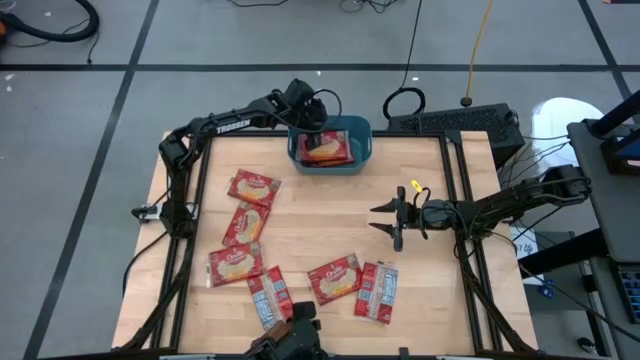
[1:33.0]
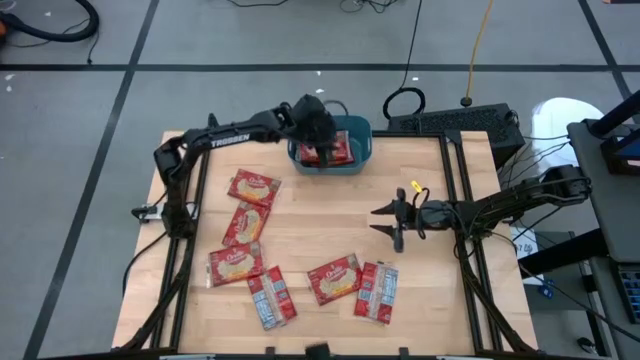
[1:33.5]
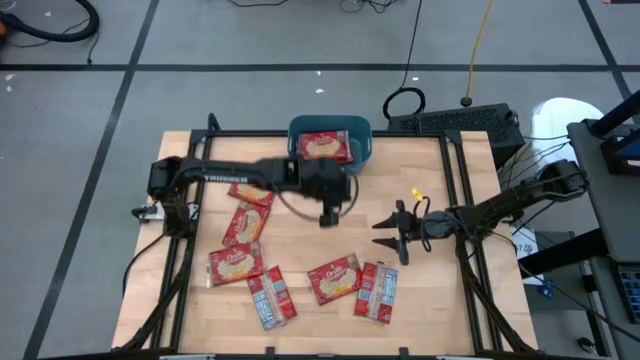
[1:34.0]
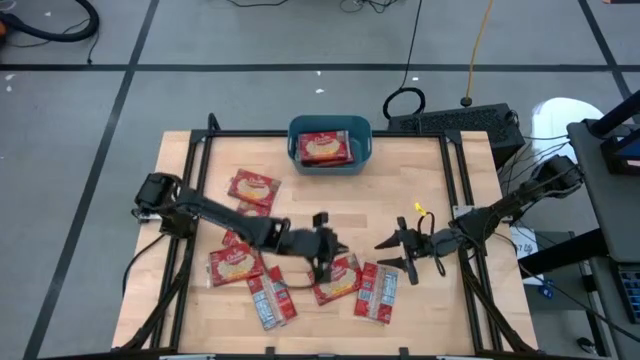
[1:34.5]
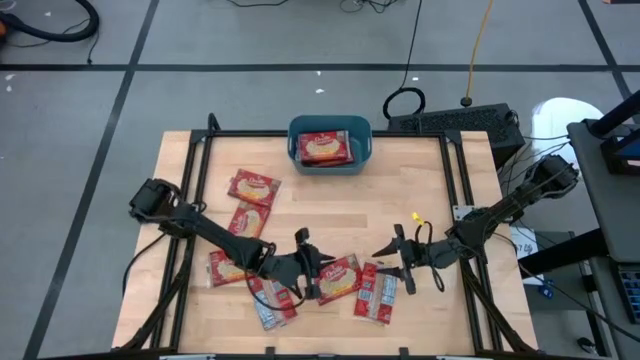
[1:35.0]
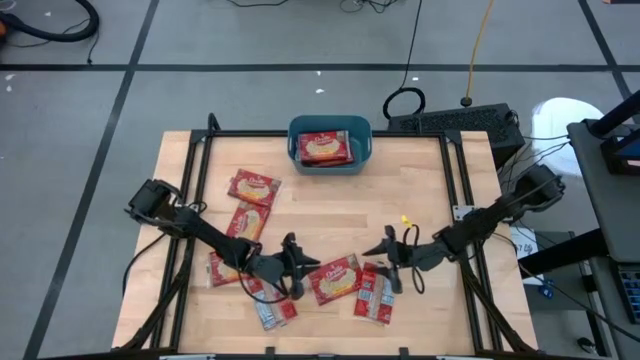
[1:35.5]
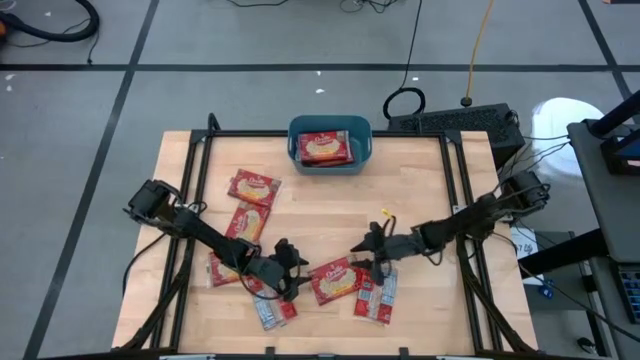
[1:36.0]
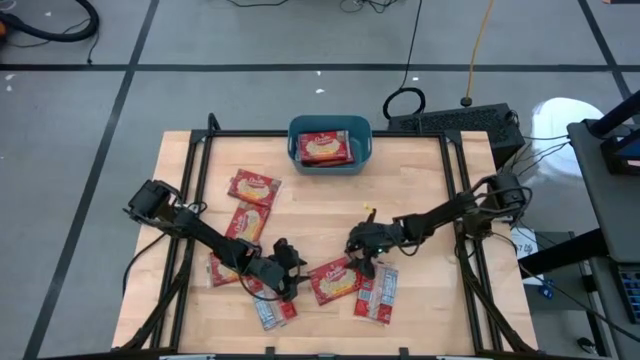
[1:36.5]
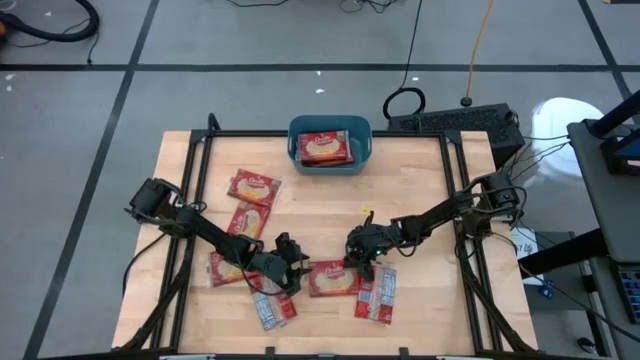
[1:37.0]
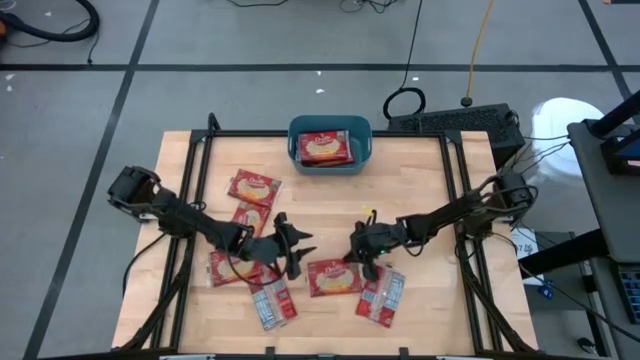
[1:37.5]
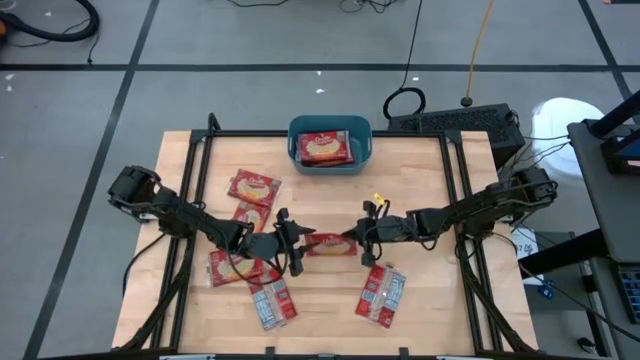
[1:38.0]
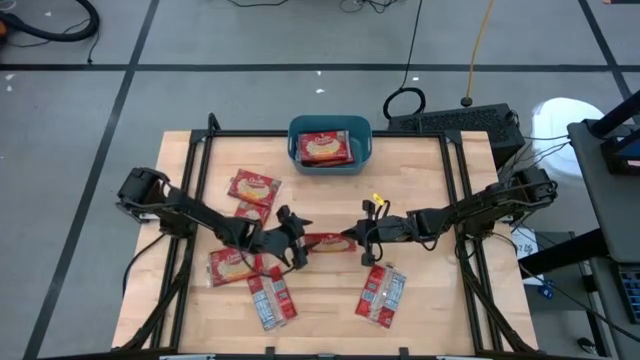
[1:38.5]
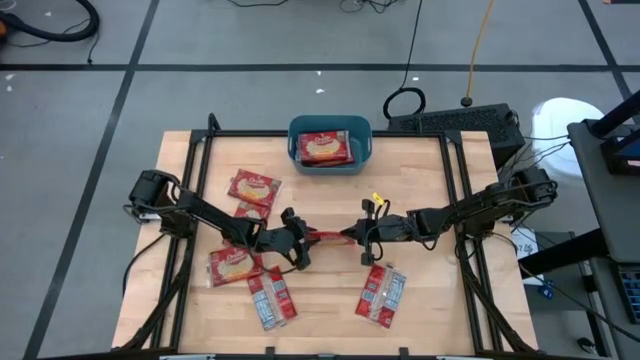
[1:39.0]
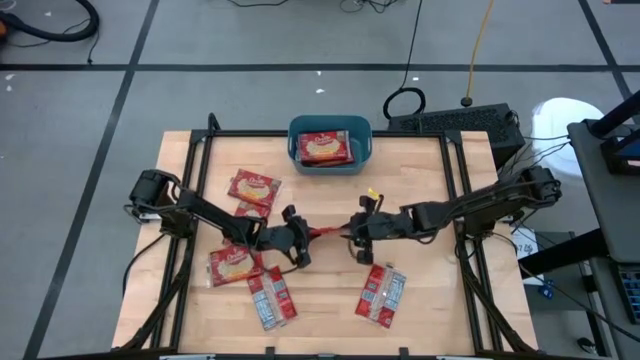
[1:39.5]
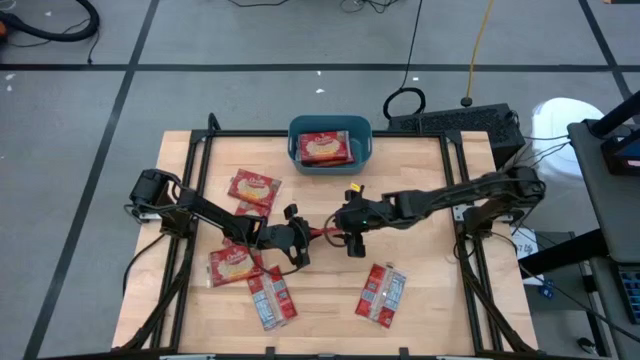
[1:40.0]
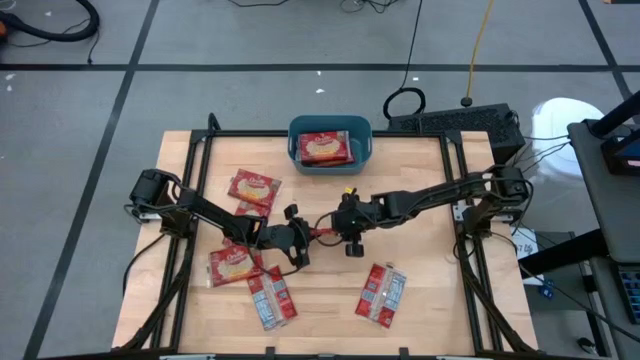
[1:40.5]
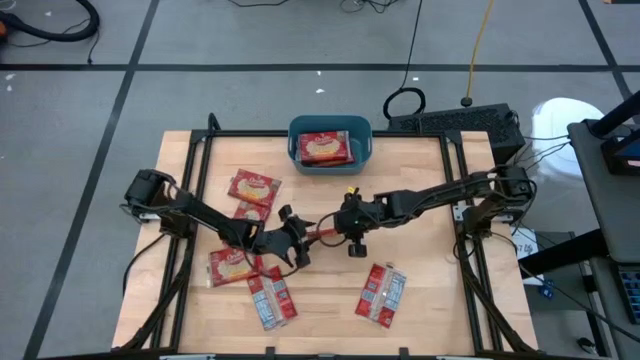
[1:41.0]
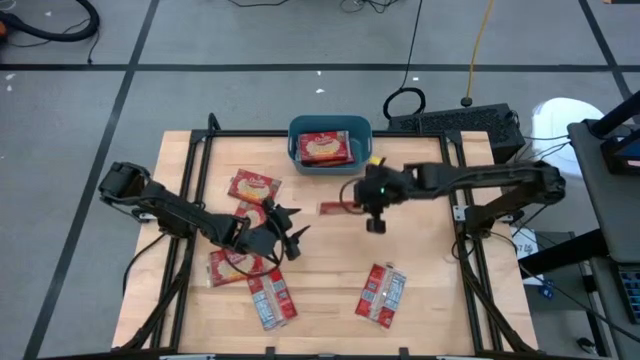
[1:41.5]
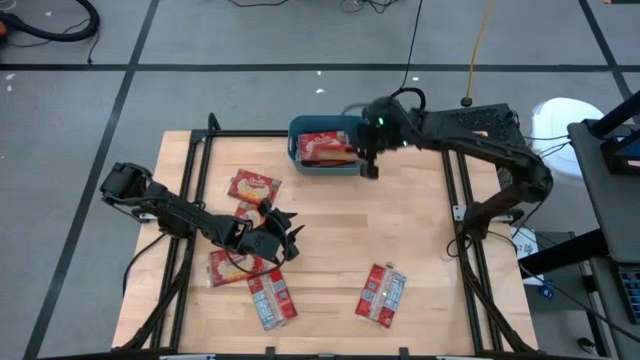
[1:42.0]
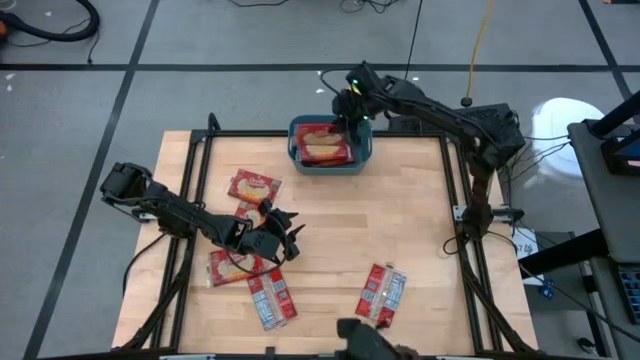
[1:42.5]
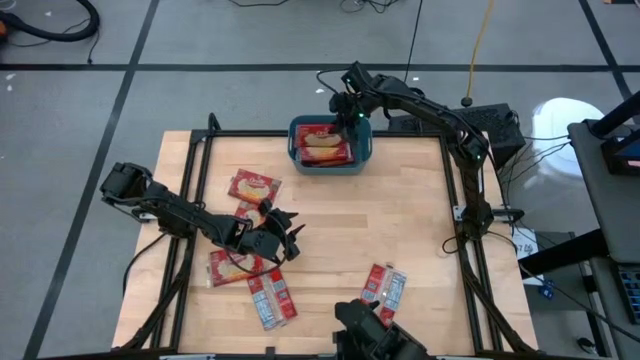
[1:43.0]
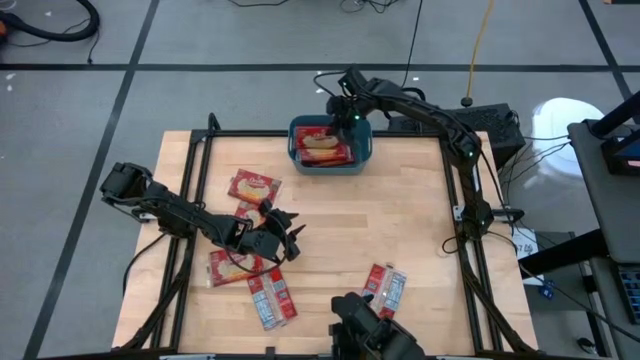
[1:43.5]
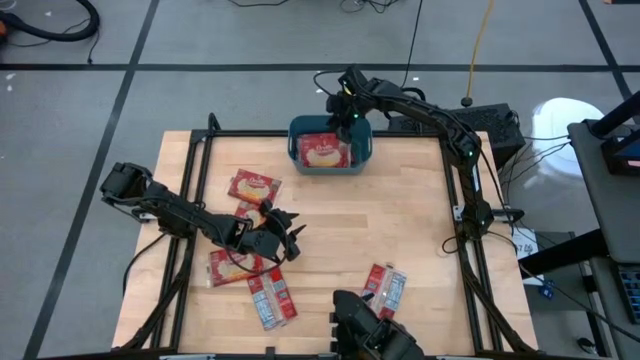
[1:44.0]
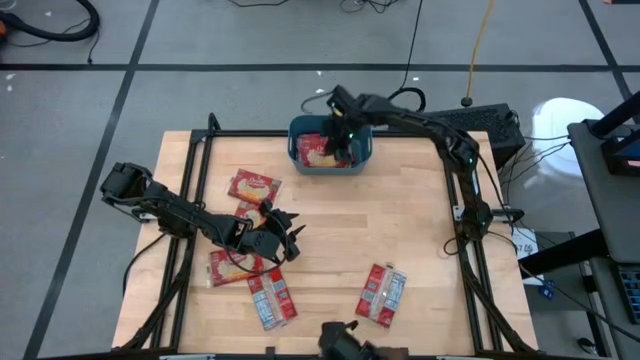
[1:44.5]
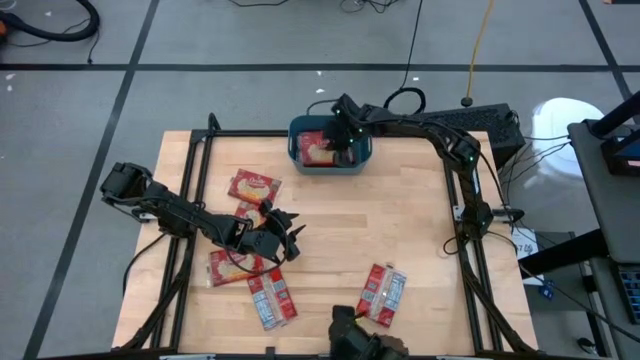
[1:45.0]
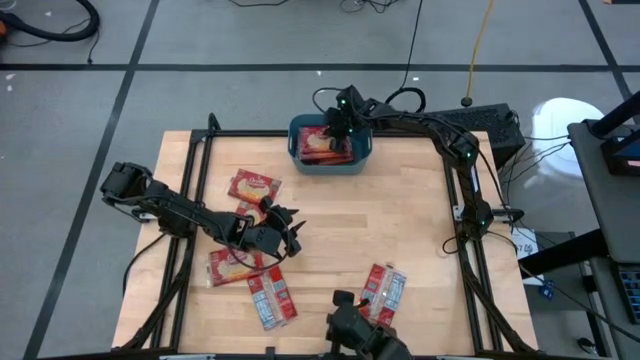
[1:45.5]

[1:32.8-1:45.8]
Task: Sort popcorn bags into baskets
Put the red popcorn bag into the blue bin

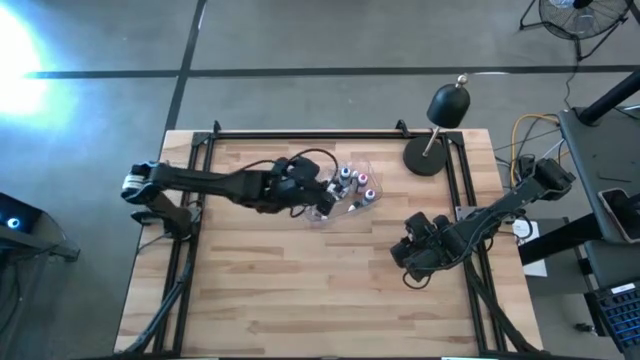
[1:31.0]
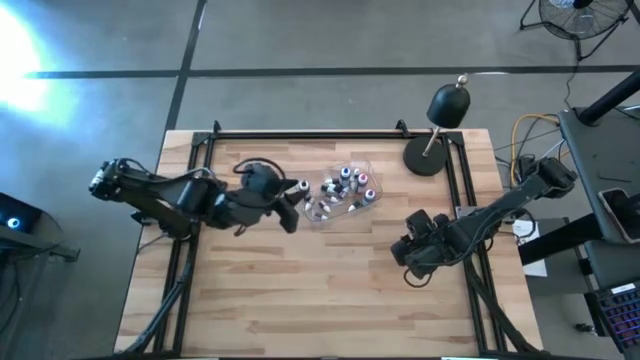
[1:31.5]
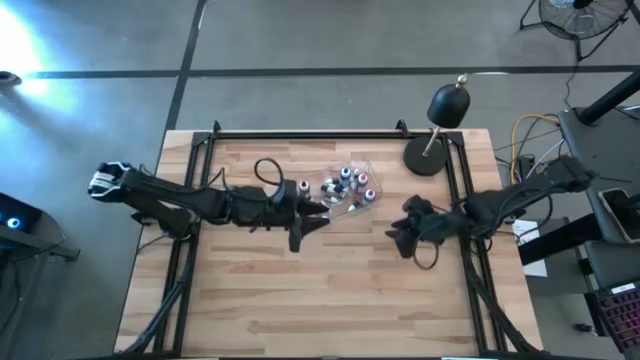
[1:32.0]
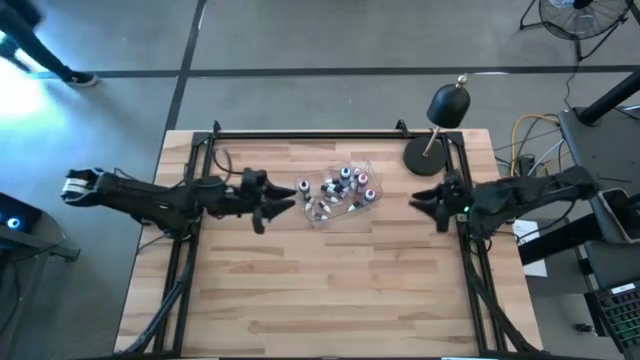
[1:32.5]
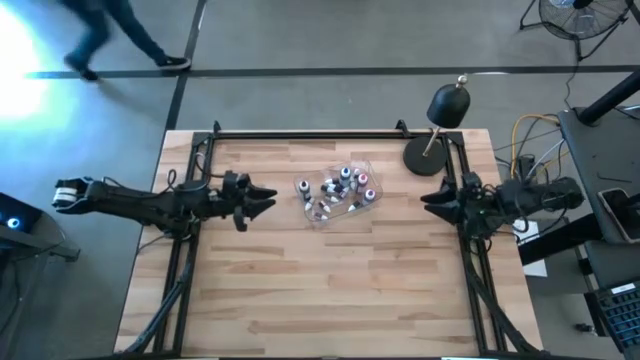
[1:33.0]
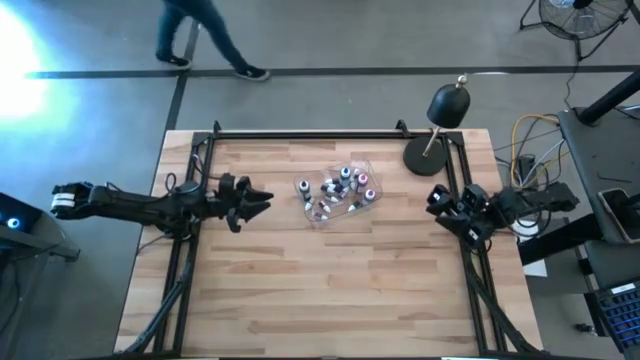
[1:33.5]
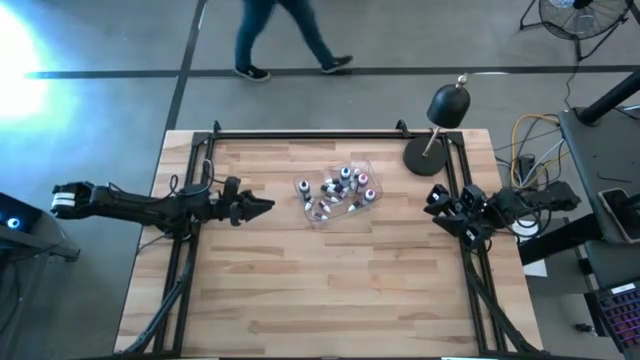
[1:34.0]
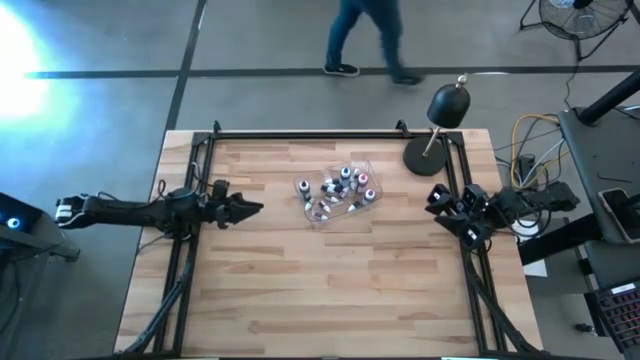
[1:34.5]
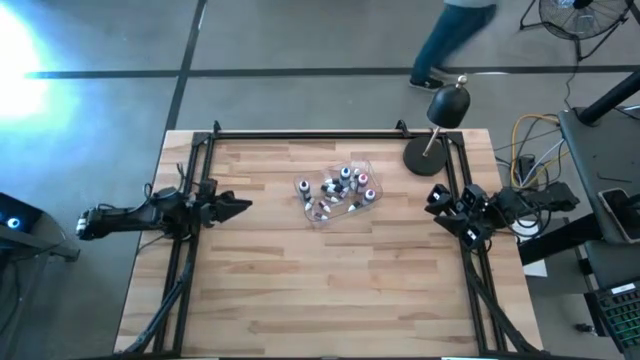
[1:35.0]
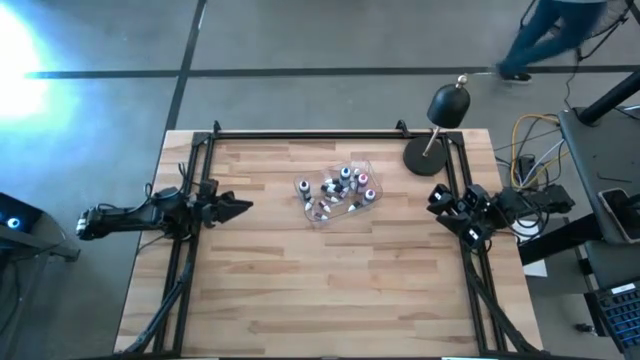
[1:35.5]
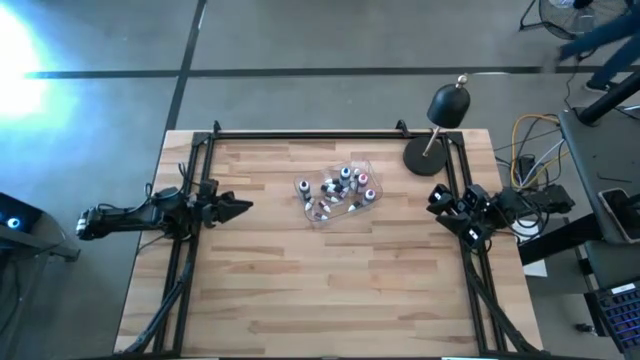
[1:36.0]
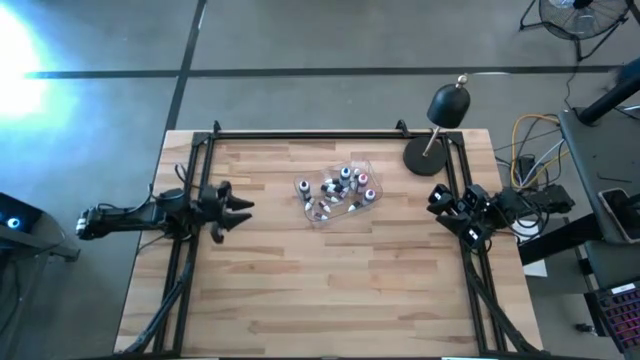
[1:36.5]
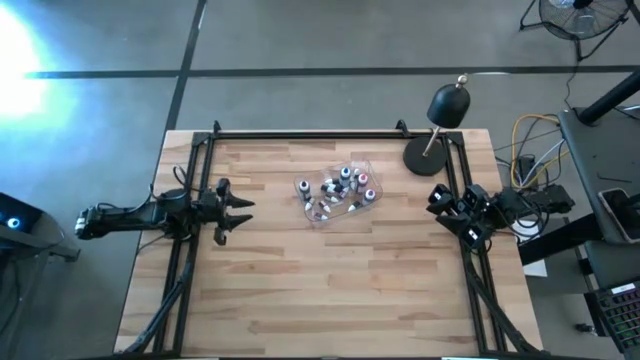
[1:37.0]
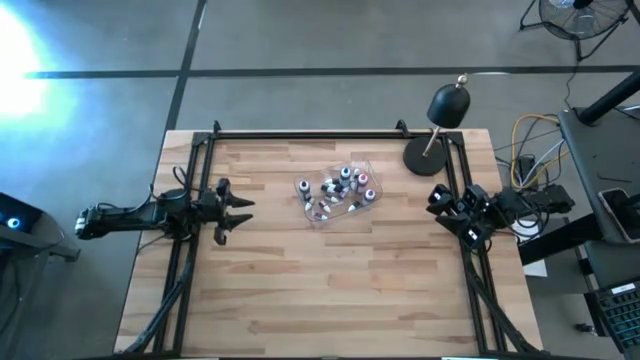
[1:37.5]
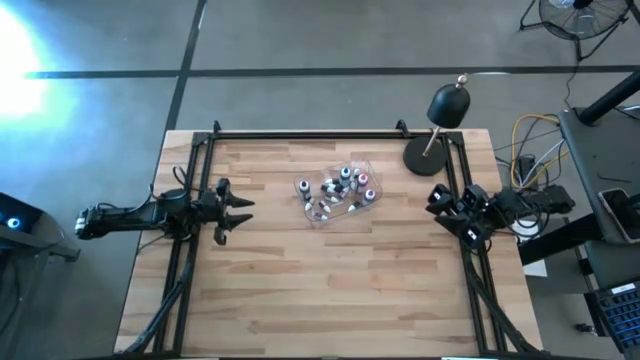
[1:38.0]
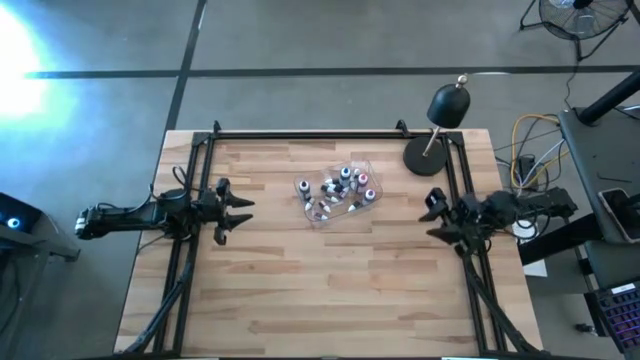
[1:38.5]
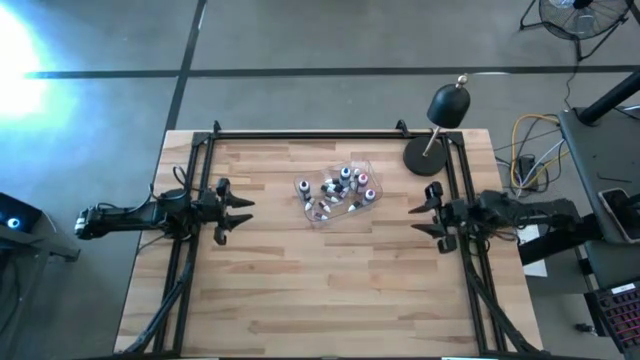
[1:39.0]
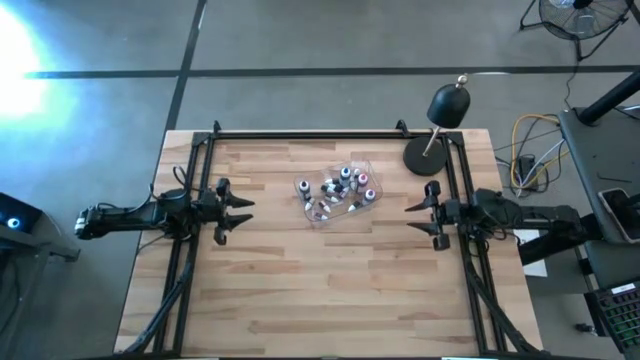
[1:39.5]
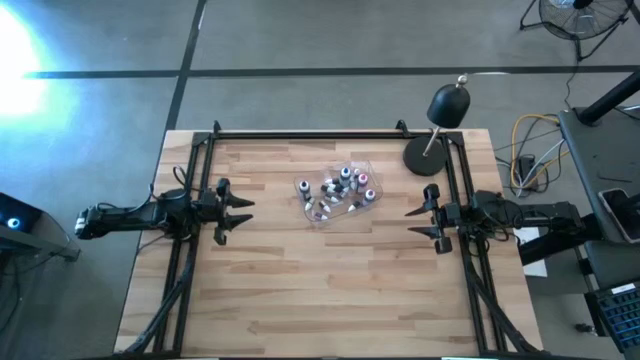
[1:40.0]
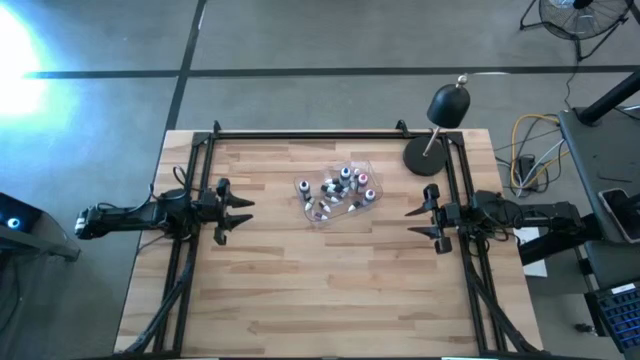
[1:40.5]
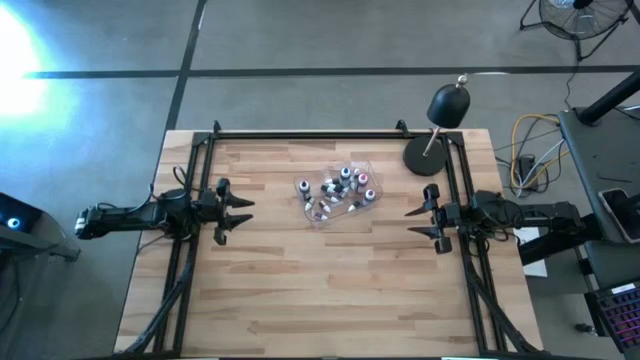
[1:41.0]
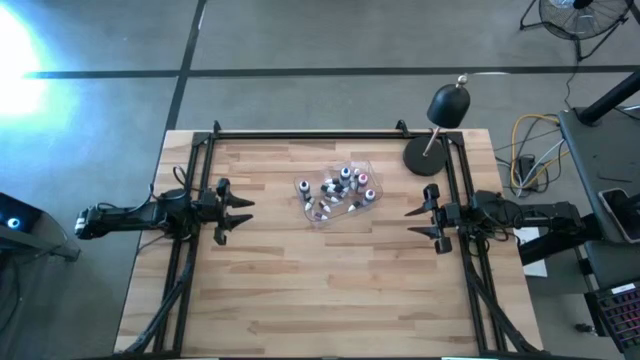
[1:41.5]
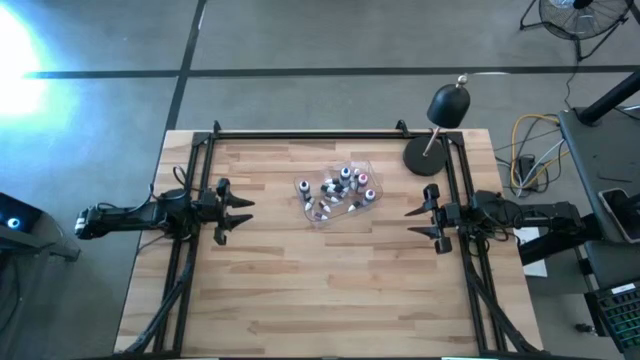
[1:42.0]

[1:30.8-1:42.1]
Task: Pick & Place food coloring
Return to Home Position
